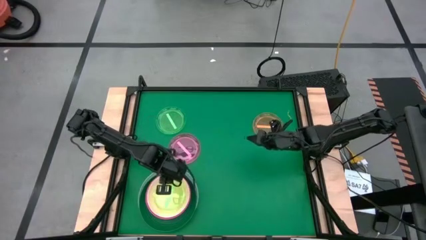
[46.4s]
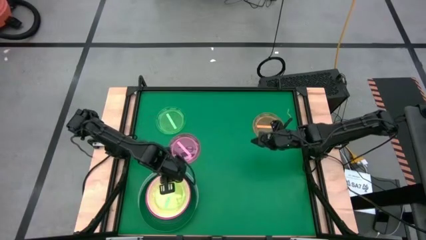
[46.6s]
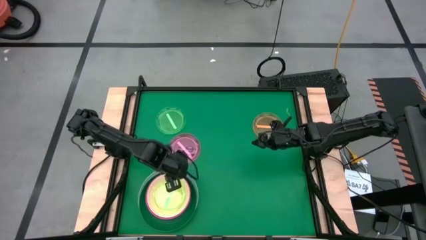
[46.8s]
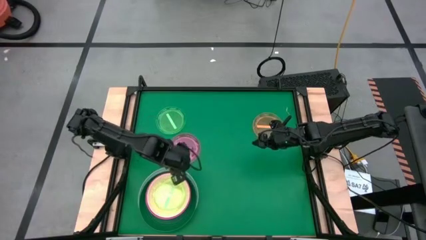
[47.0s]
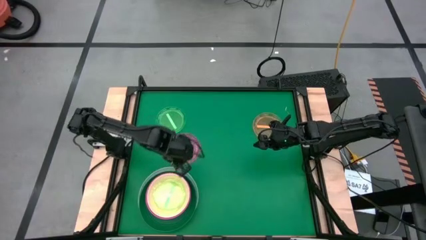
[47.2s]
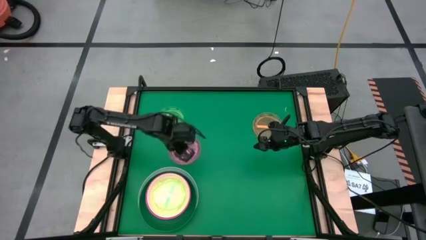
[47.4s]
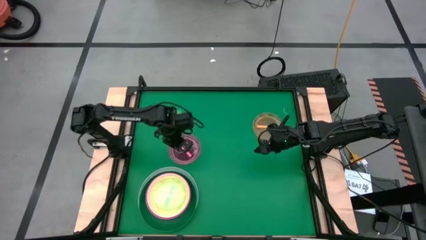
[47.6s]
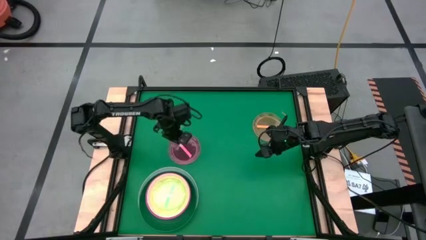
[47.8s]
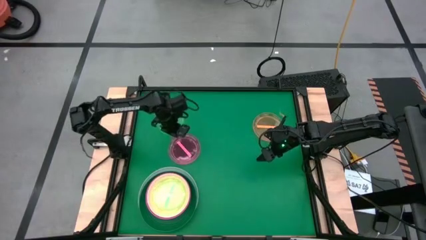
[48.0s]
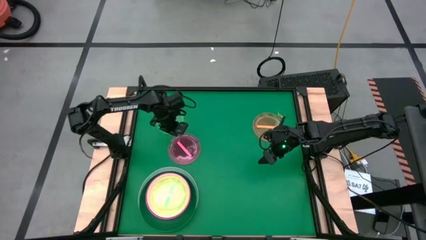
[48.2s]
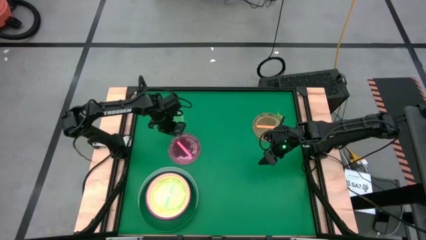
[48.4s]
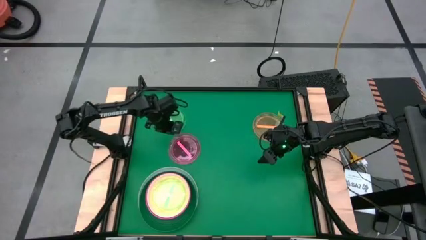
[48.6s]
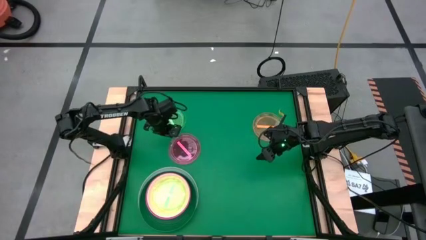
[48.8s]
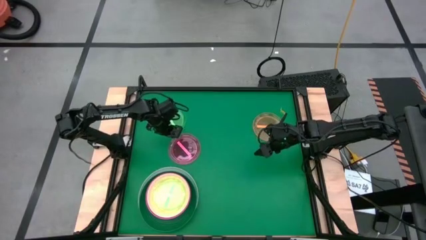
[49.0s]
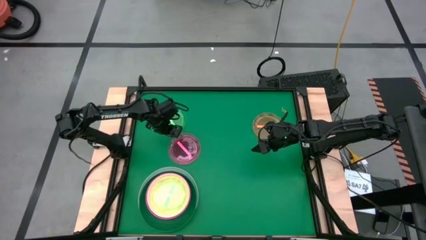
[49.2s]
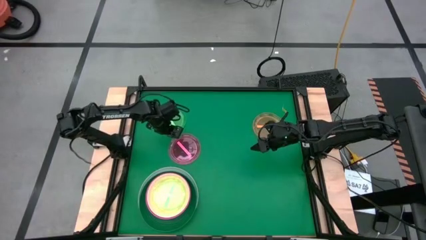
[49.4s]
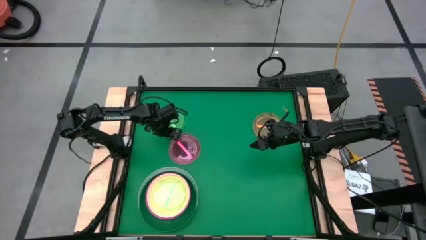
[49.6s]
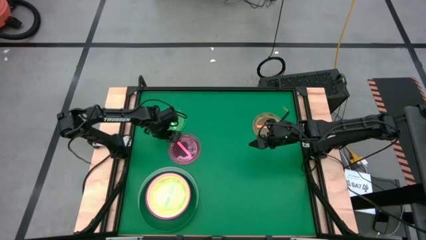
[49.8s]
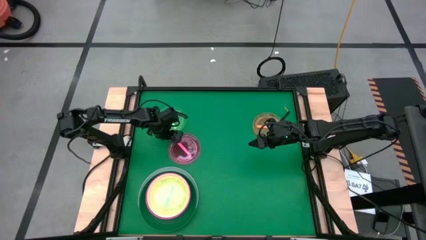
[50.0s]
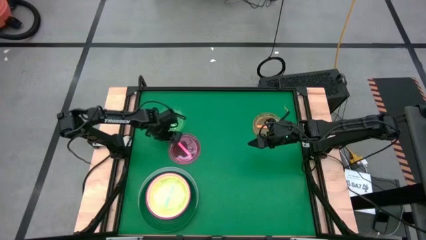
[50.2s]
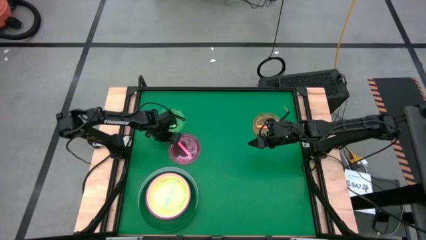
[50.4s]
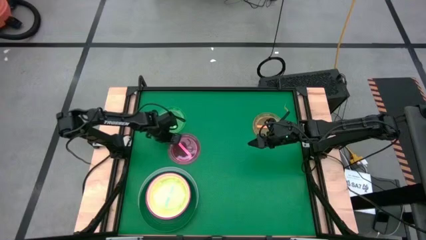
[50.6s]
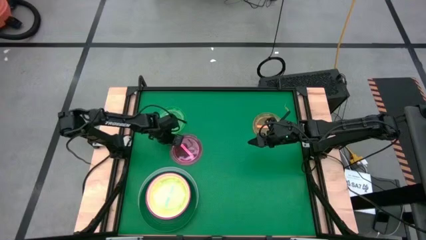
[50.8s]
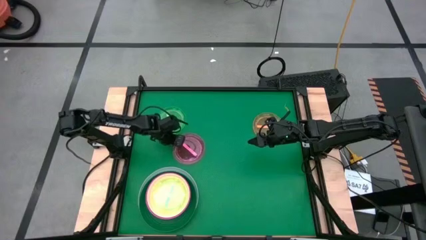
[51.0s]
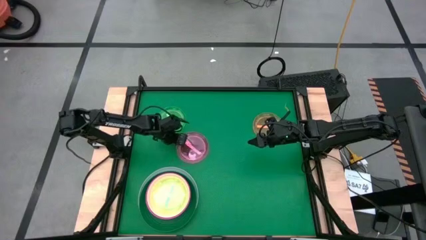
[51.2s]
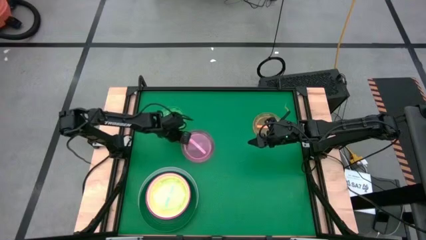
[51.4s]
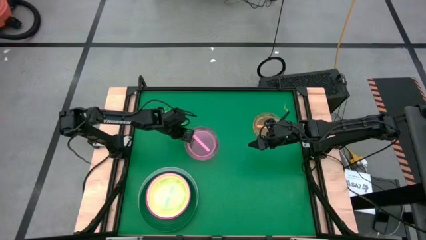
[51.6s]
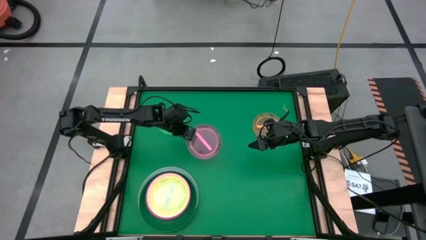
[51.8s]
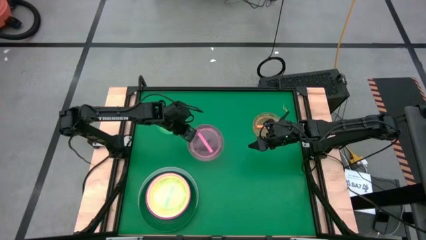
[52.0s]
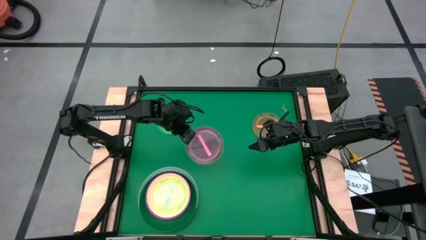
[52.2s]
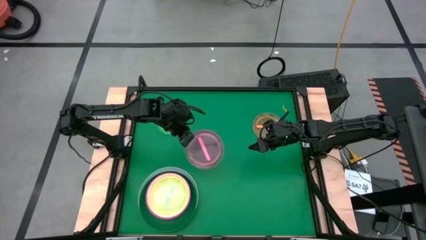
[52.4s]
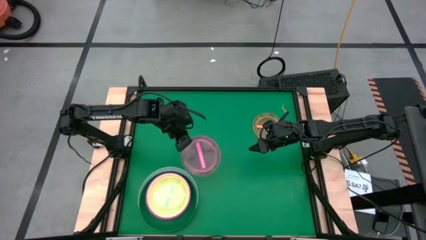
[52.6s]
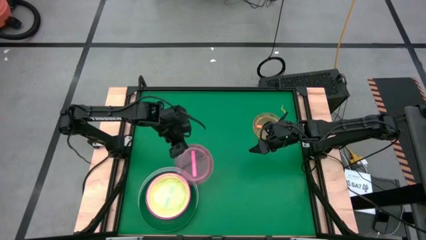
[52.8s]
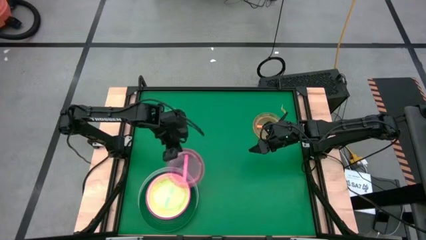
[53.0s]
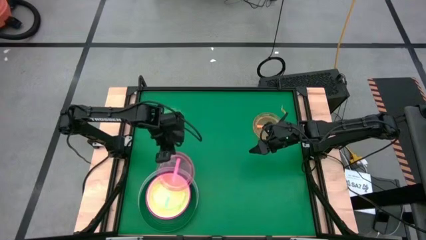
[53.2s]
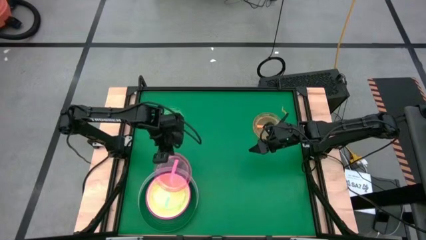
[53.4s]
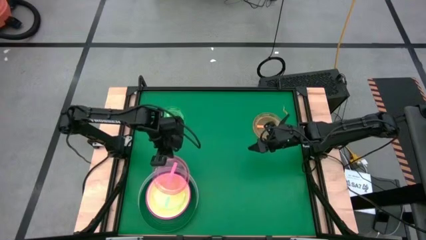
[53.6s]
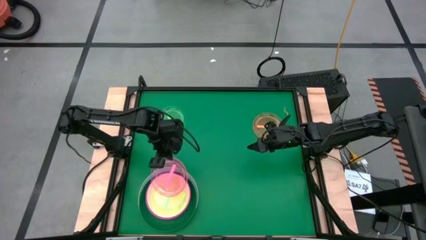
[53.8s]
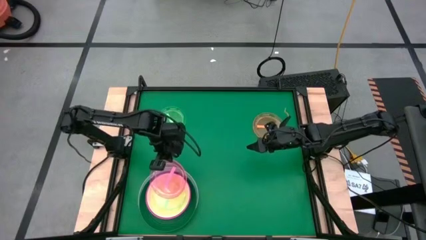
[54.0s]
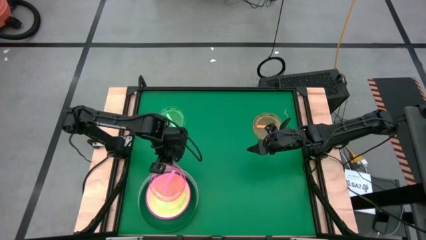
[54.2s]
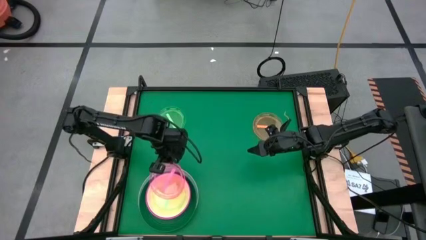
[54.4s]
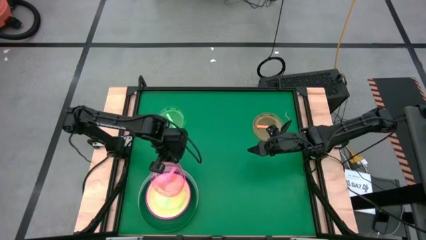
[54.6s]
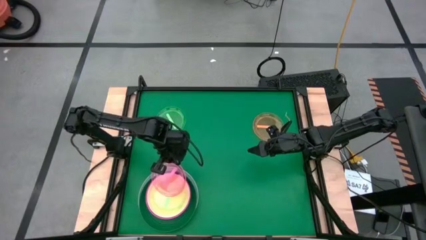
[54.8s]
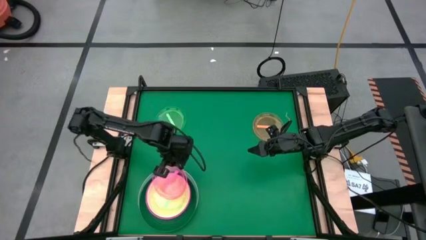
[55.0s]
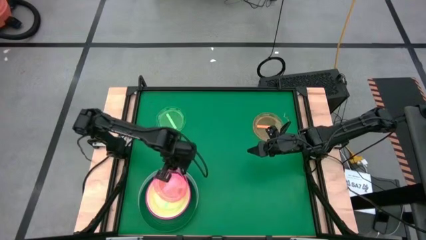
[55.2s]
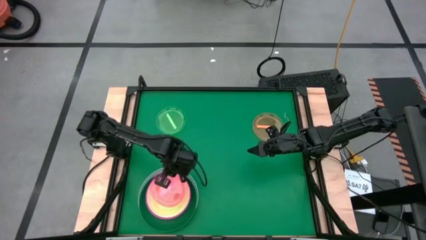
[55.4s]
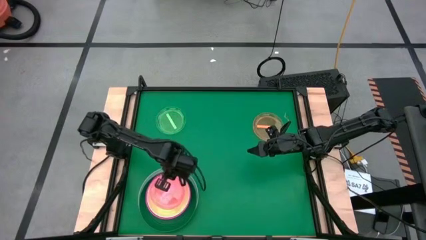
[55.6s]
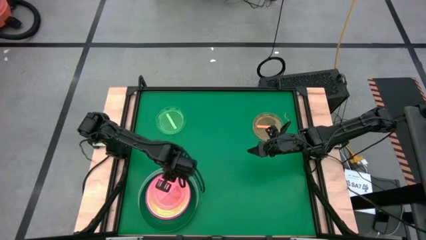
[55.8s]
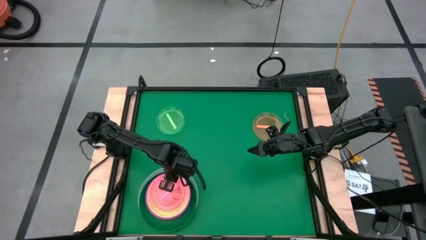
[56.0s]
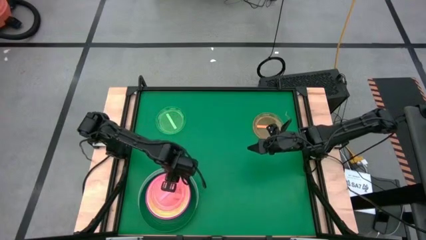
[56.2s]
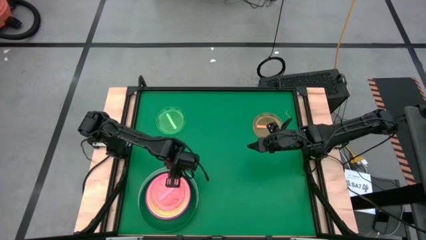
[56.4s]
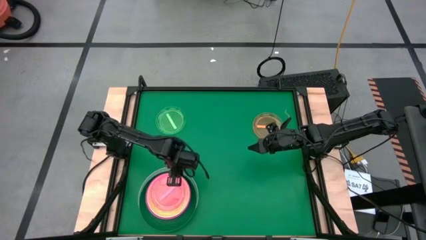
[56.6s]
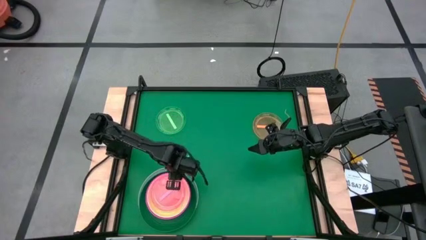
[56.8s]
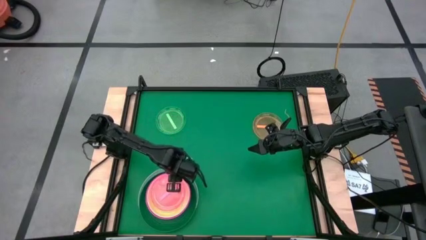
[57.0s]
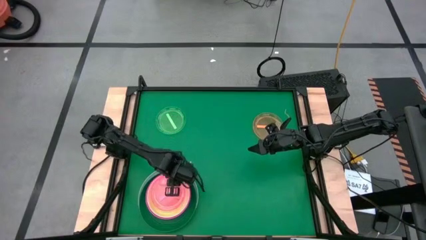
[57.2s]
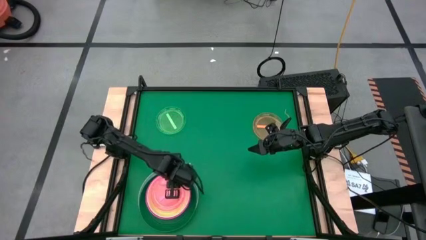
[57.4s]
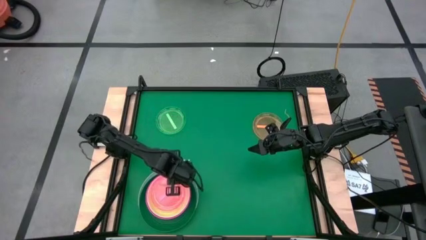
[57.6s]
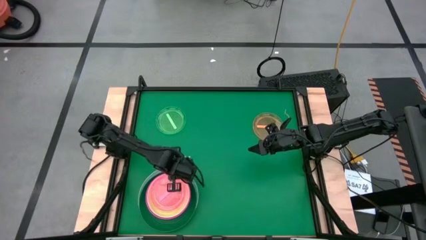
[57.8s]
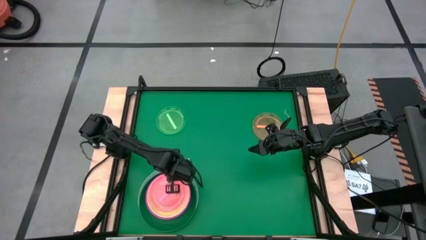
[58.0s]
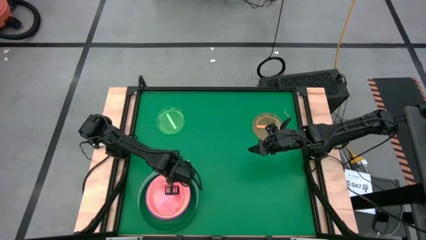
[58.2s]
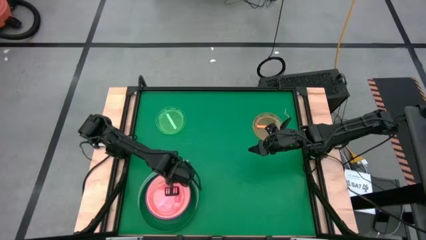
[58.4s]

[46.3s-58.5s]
Task: Stack plastic plates
Stack the small pink plate on top of the stacked small green plate
